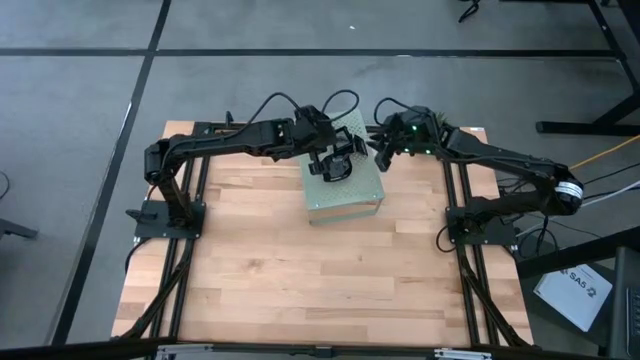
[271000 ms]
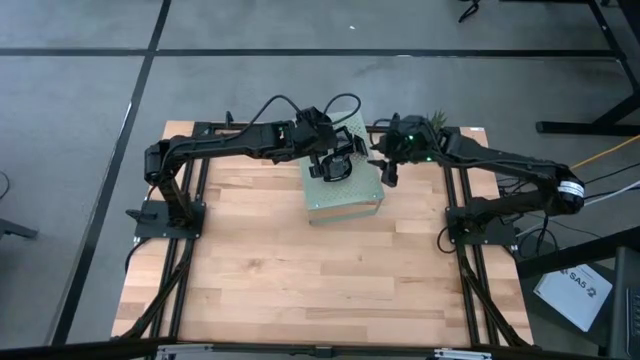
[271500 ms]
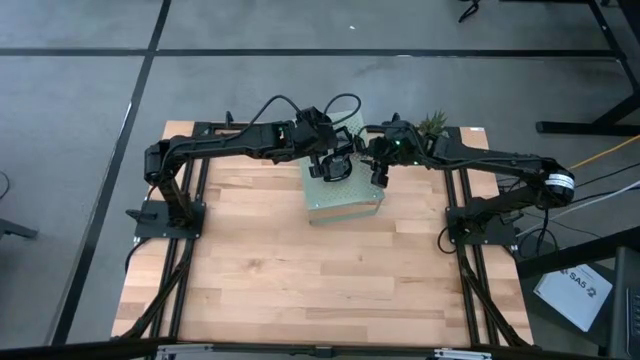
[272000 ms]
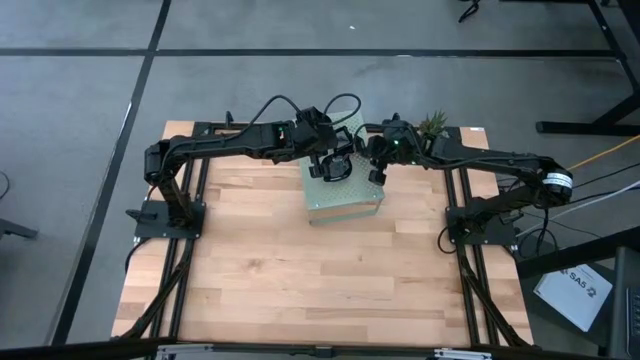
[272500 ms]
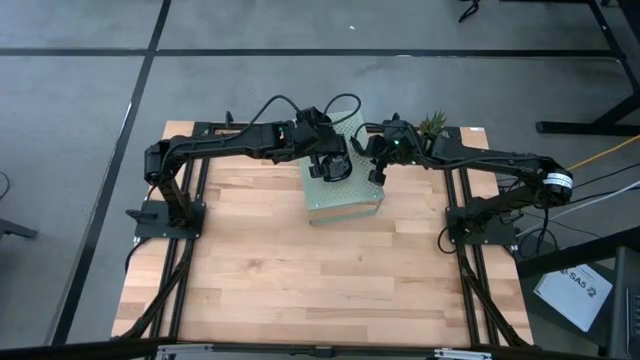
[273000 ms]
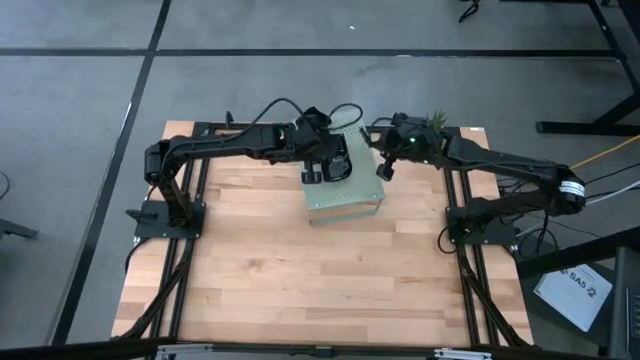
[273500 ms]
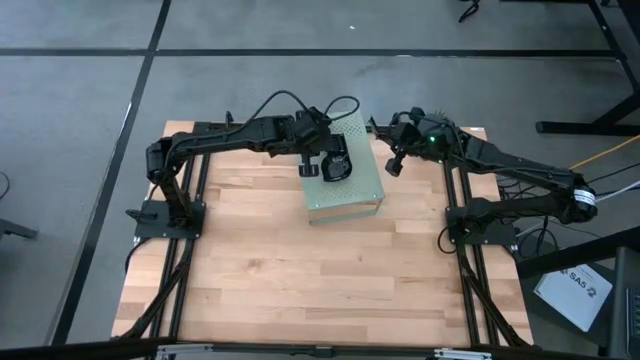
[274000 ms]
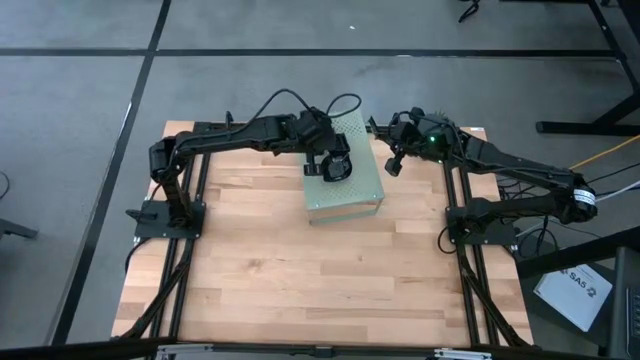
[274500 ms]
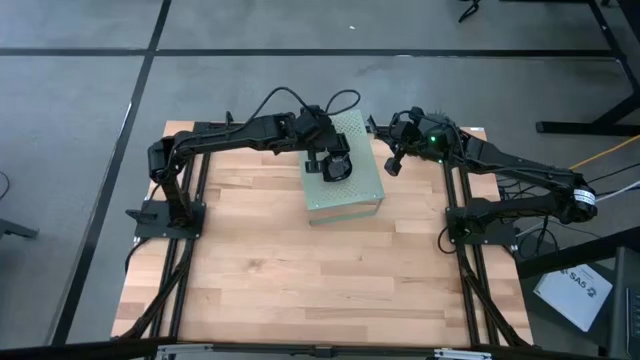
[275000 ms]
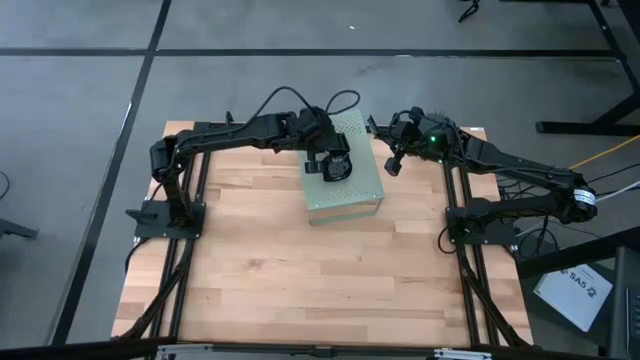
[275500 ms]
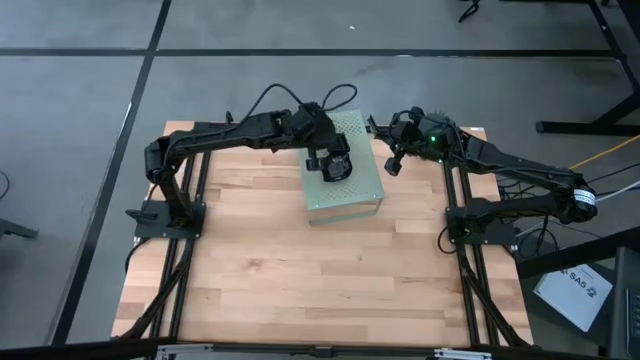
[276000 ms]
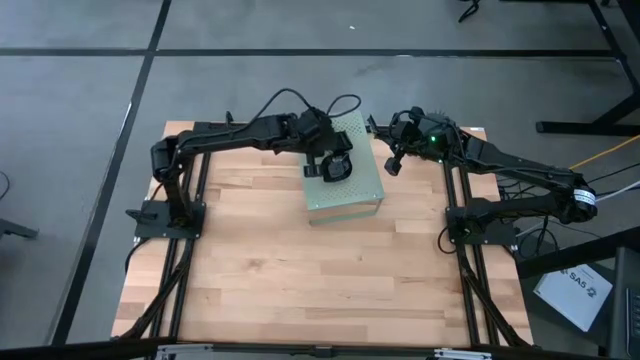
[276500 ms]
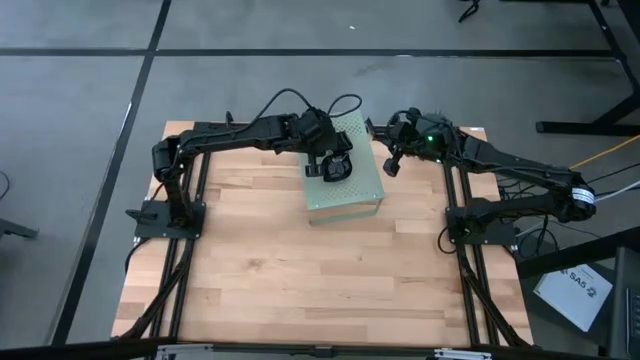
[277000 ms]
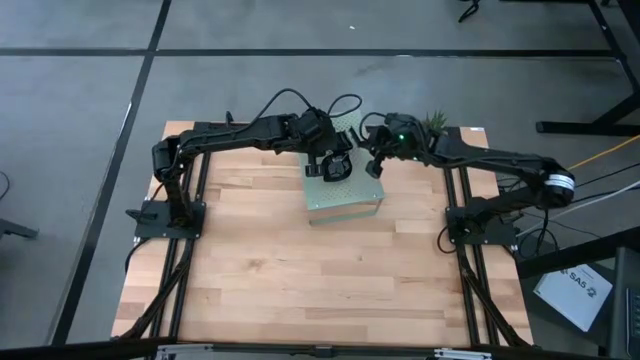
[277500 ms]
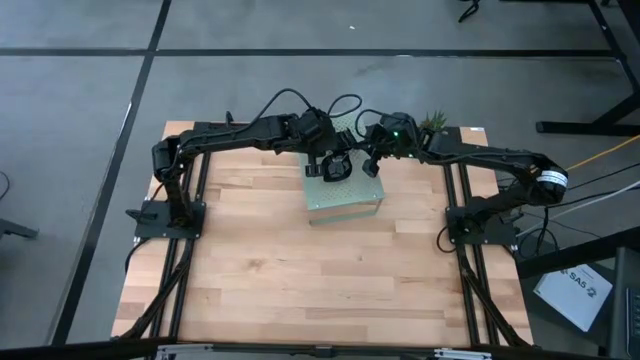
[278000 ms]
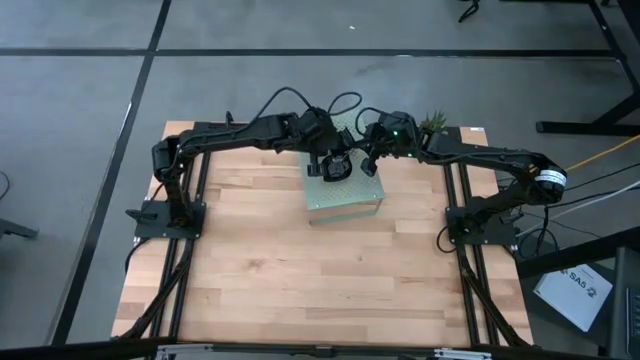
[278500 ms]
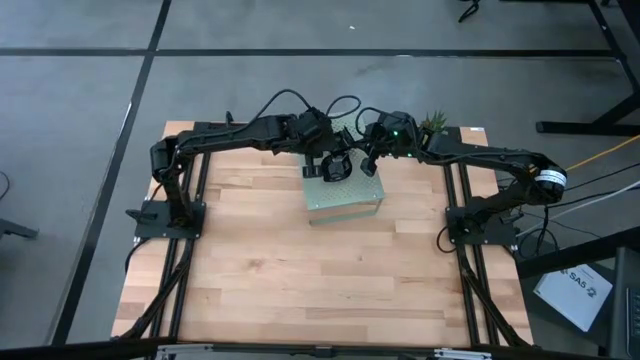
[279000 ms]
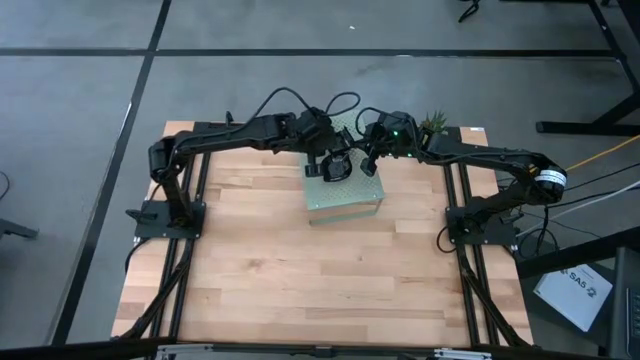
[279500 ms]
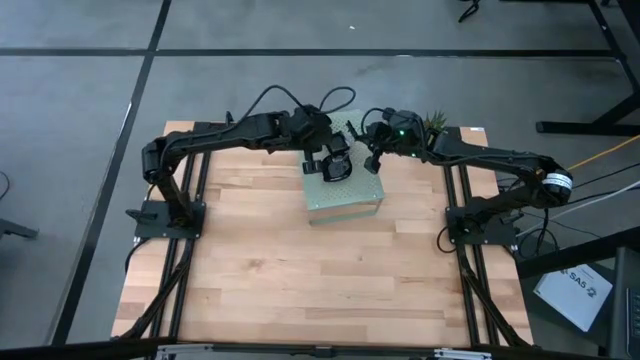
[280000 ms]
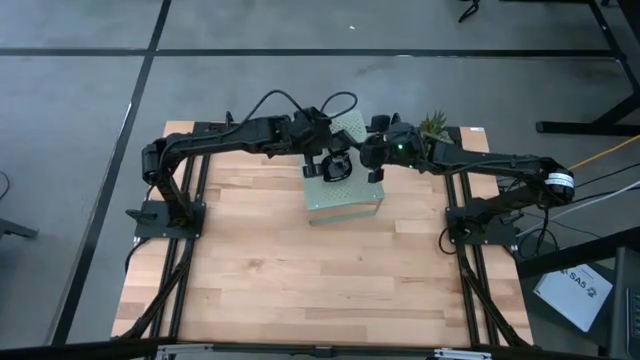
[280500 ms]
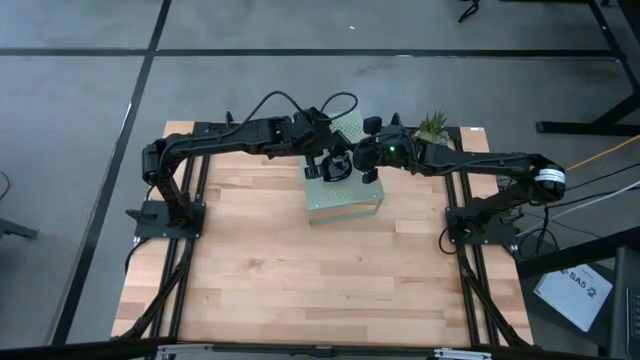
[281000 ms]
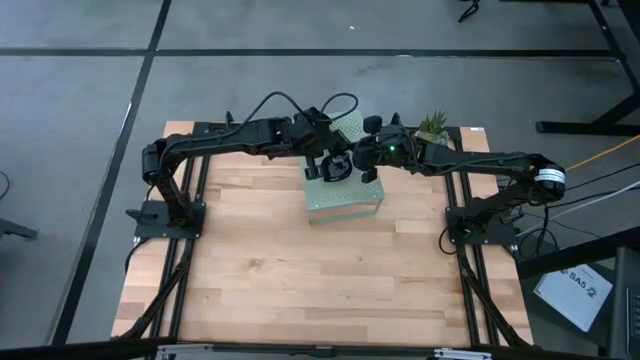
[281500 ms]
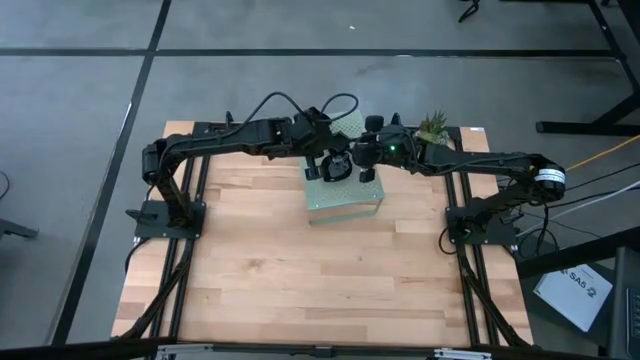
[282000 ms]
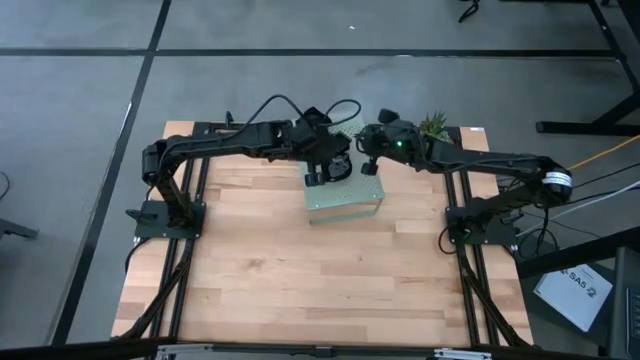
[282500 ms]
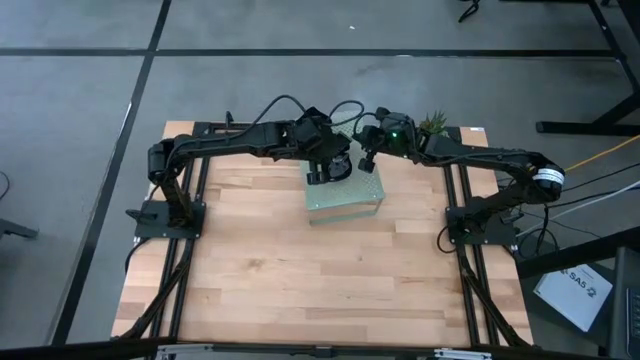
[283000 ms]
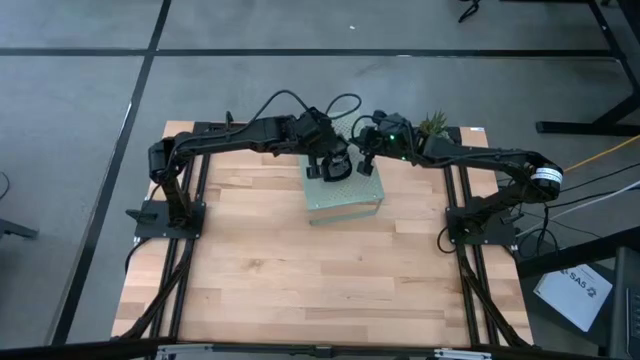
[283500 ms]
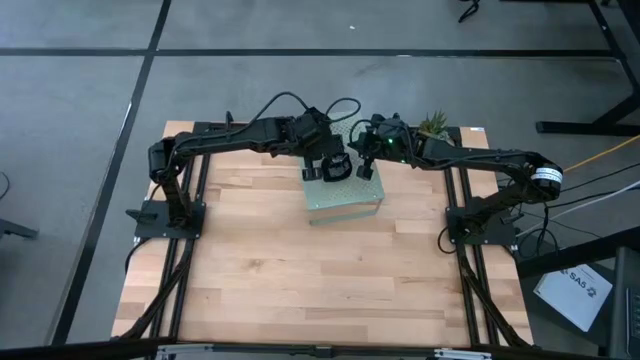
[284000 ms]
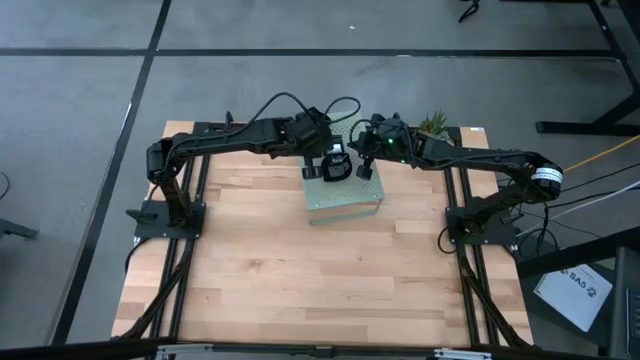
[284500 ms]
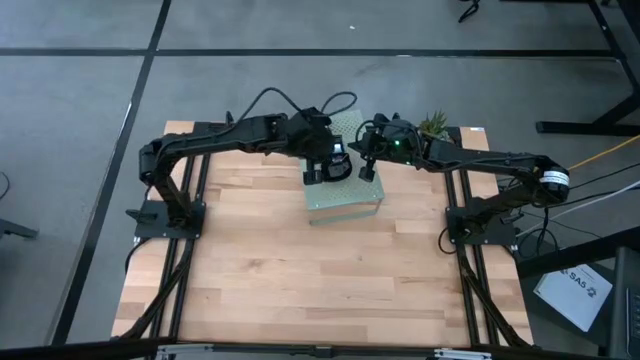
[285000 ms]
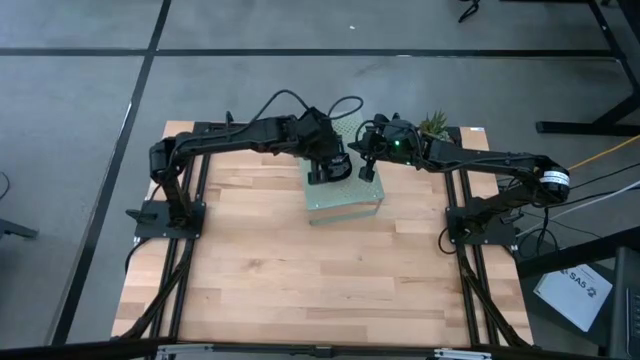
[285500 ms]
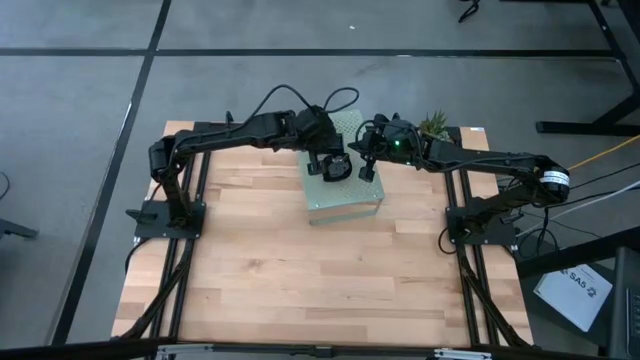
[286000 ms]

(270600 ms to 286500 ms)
Task: Pick & Place Mini shaped plates
Stack the black square plate on top of the black square plates on the shelf

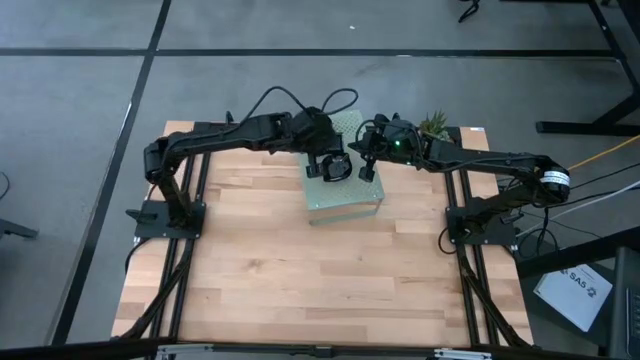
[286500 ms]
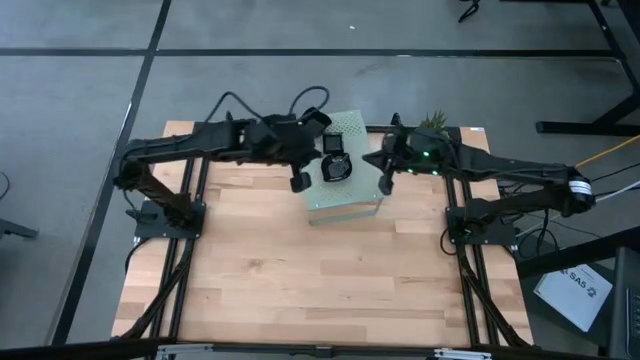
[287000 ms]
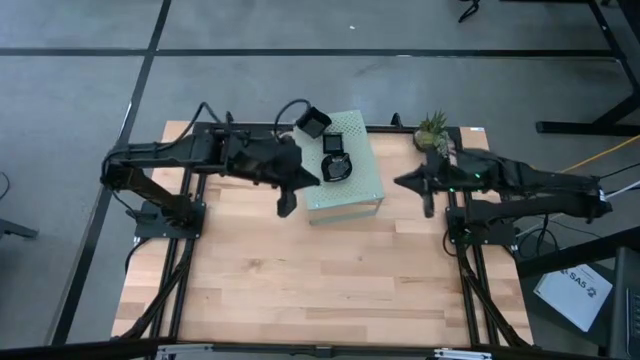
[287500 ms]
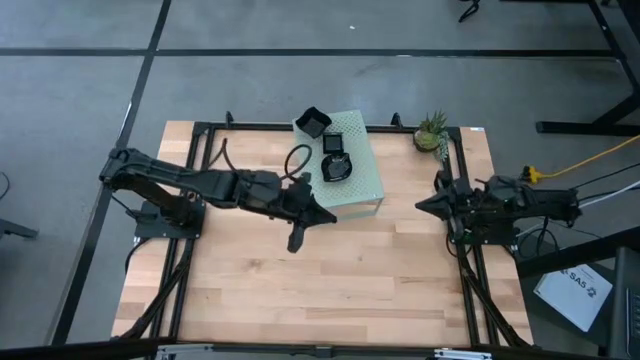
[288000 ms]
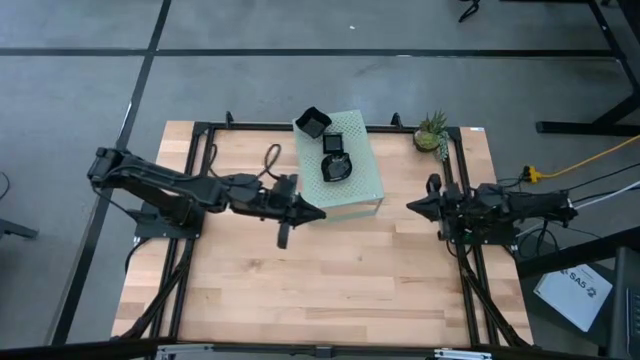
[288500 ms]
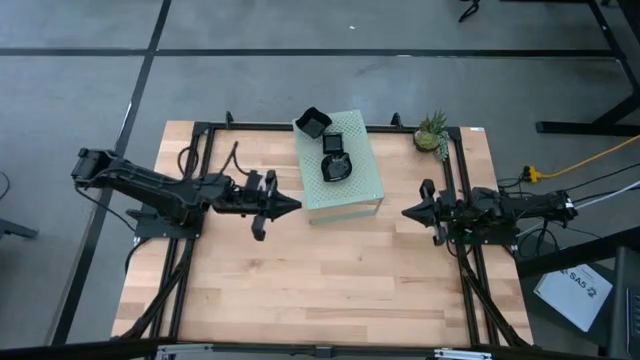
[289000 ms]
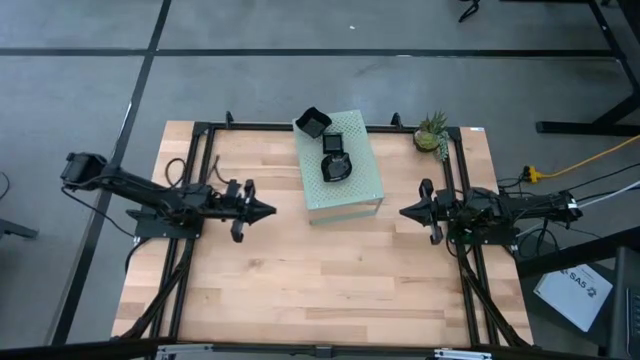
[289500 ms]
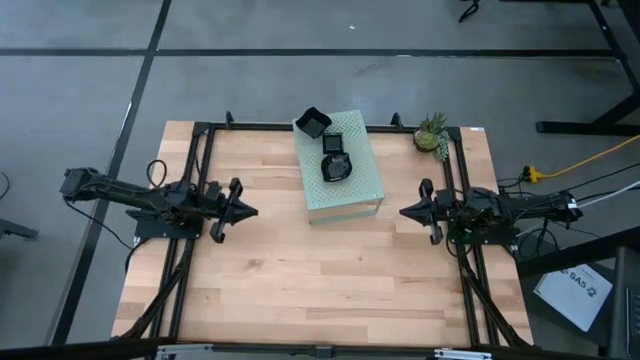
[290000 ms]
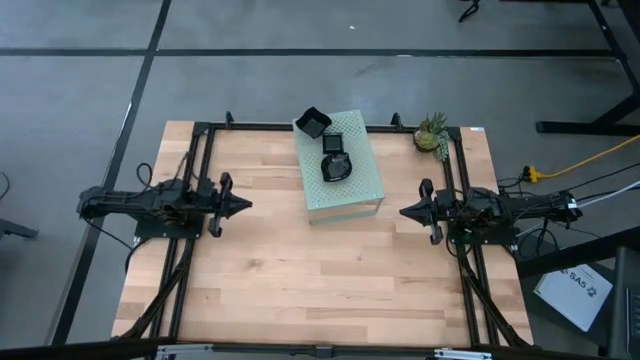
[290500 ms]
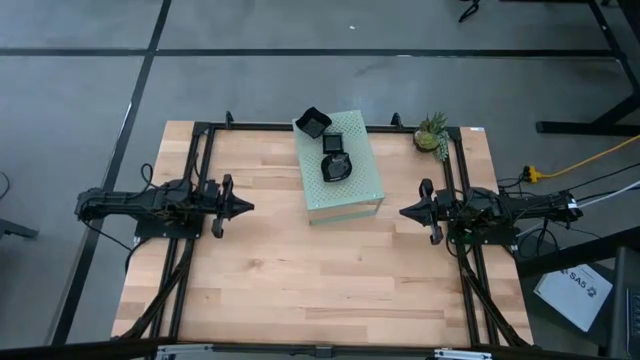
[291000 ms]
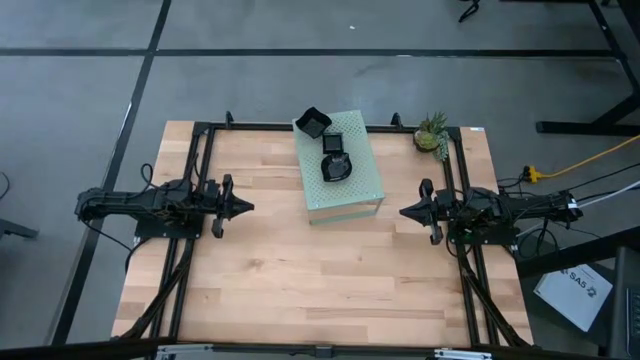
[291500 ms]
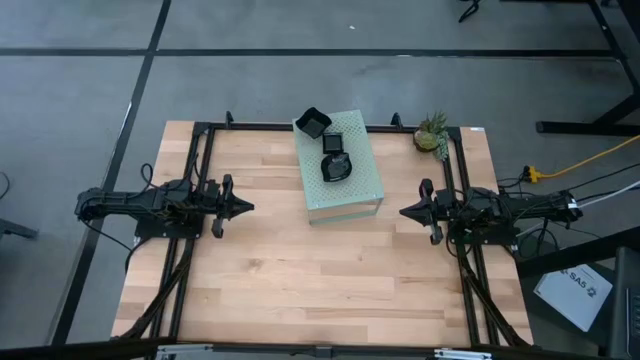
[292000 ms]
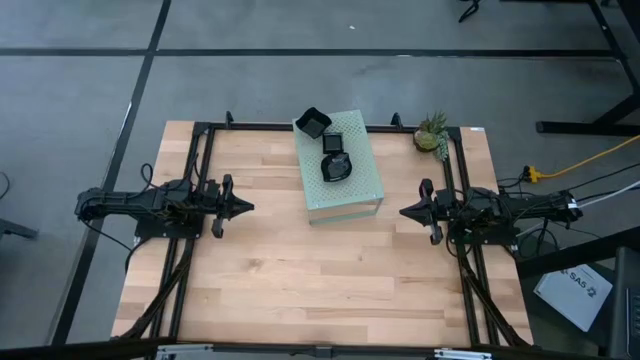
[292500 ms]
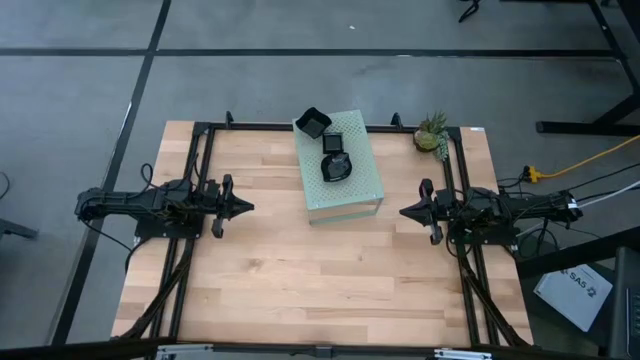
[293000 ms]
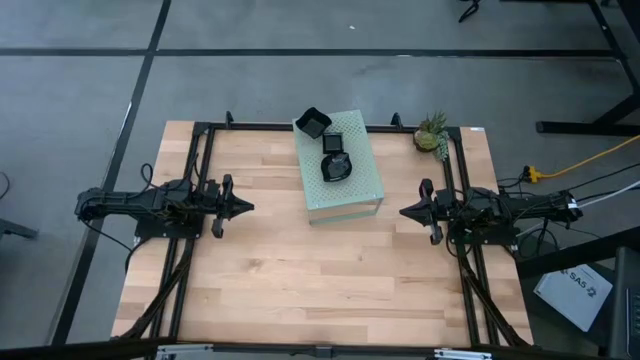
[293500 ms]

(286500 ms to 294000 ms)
Return to Home Position
